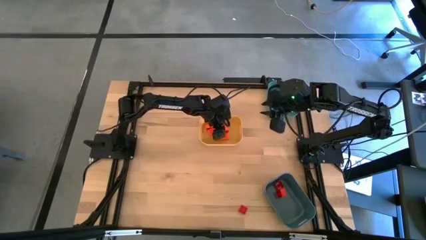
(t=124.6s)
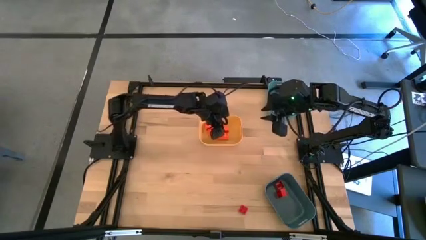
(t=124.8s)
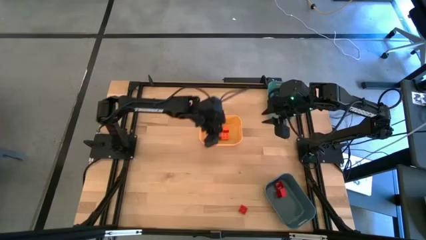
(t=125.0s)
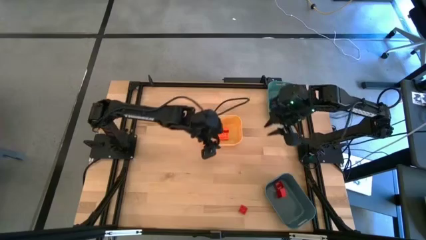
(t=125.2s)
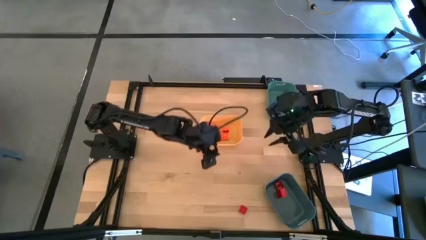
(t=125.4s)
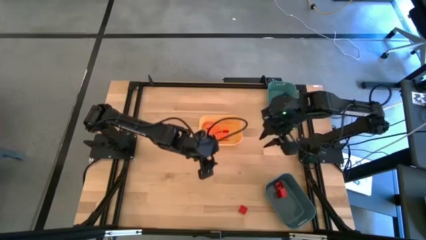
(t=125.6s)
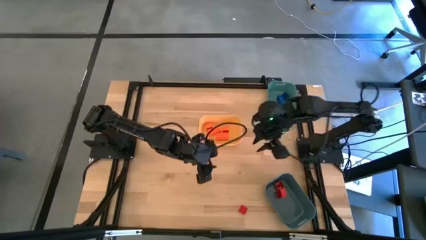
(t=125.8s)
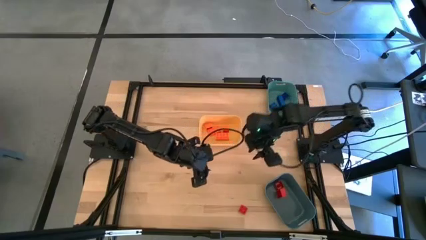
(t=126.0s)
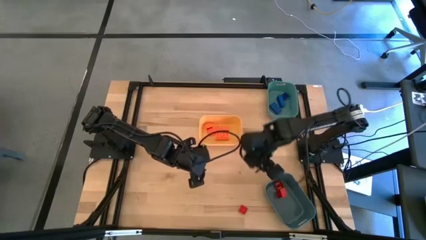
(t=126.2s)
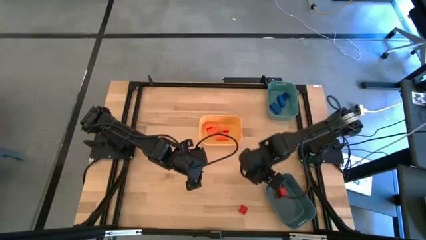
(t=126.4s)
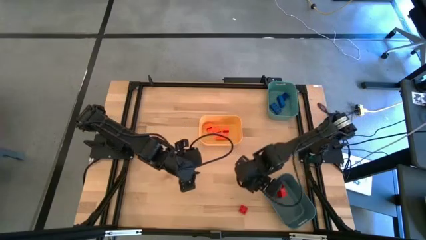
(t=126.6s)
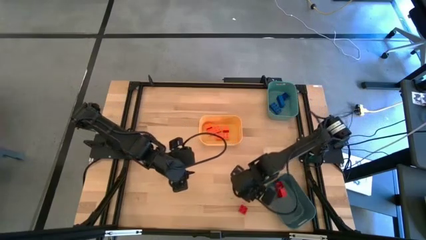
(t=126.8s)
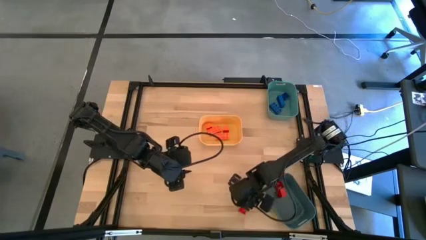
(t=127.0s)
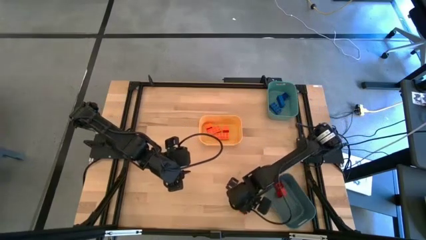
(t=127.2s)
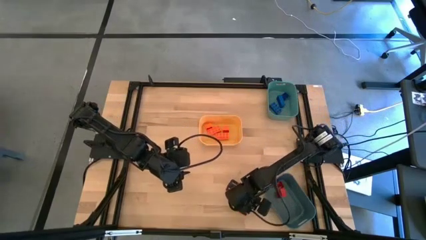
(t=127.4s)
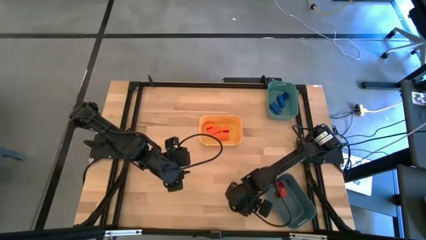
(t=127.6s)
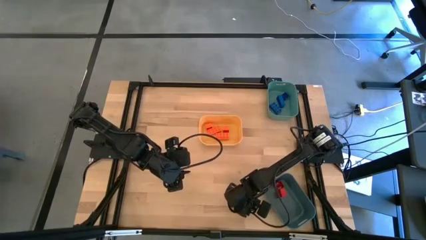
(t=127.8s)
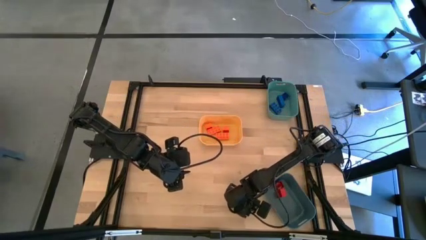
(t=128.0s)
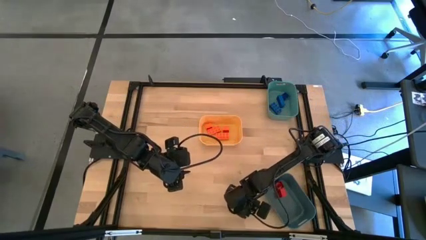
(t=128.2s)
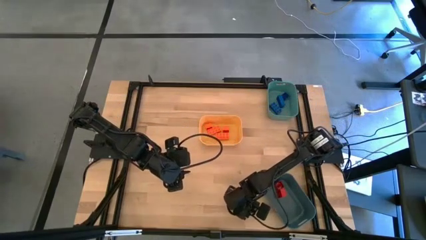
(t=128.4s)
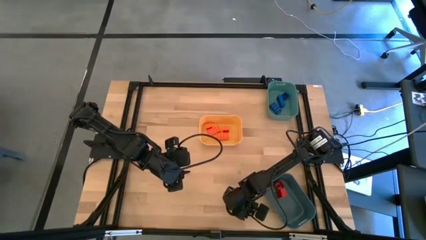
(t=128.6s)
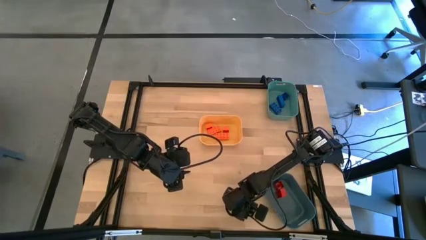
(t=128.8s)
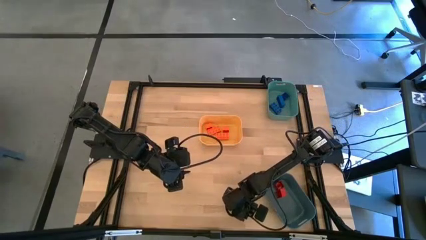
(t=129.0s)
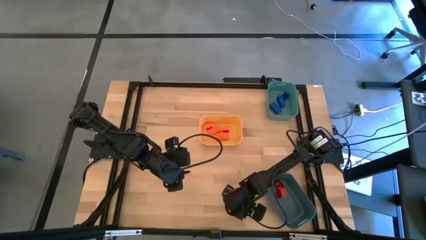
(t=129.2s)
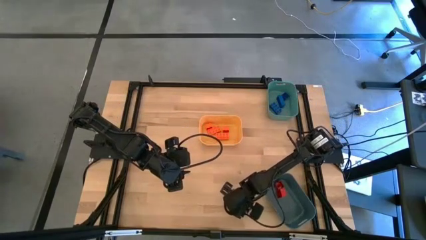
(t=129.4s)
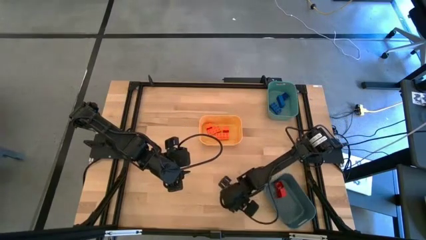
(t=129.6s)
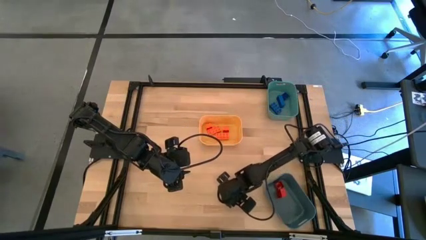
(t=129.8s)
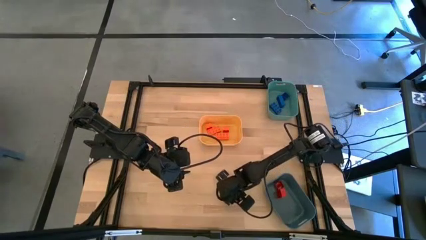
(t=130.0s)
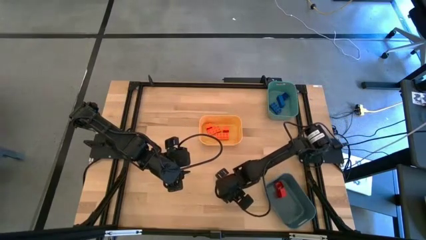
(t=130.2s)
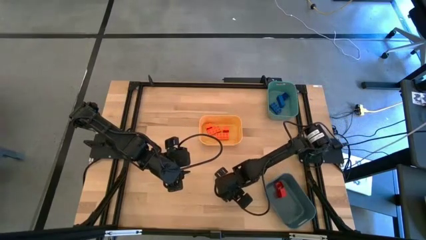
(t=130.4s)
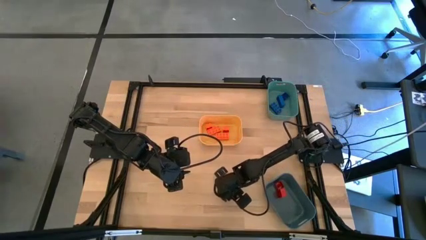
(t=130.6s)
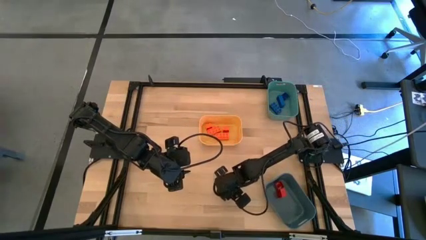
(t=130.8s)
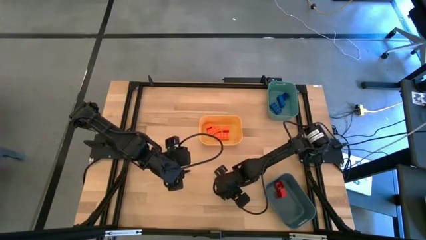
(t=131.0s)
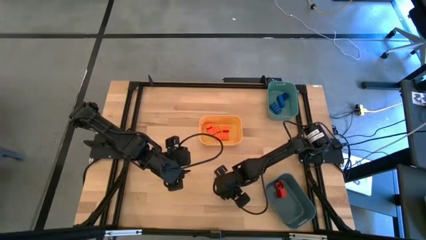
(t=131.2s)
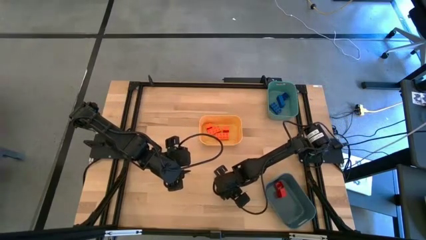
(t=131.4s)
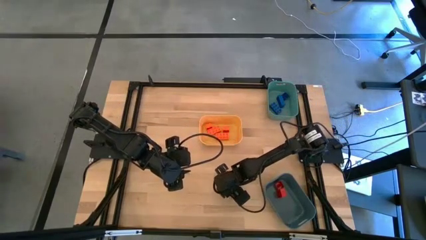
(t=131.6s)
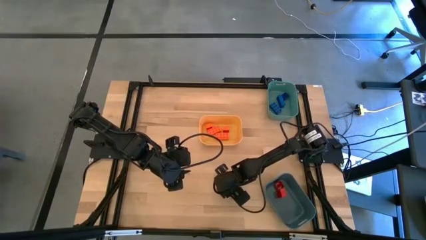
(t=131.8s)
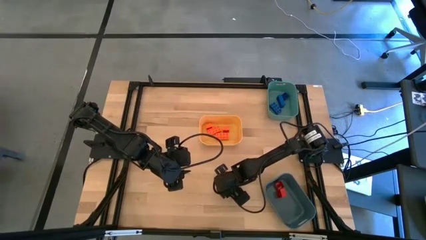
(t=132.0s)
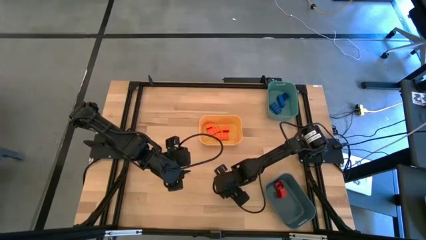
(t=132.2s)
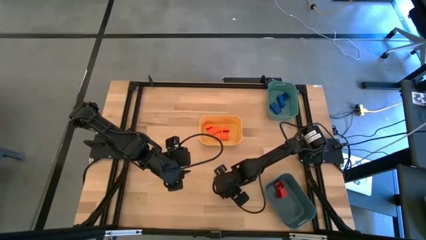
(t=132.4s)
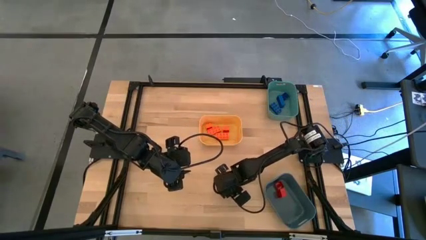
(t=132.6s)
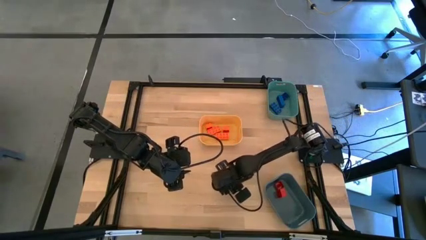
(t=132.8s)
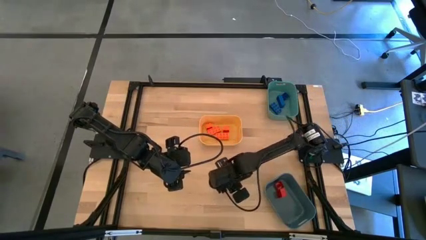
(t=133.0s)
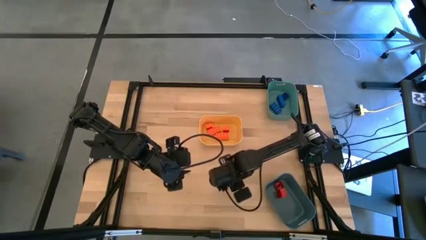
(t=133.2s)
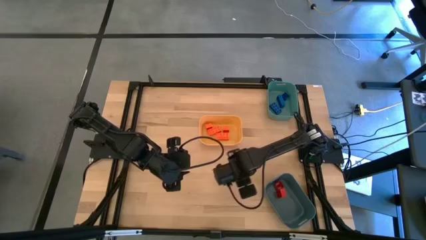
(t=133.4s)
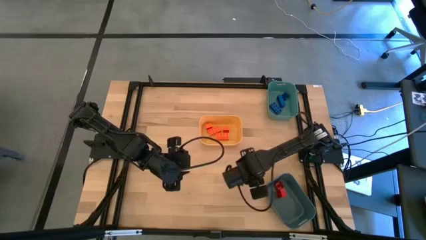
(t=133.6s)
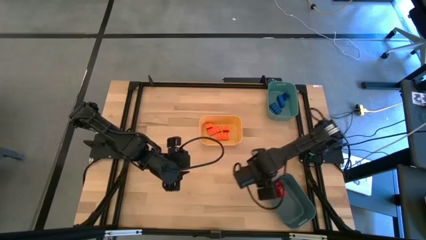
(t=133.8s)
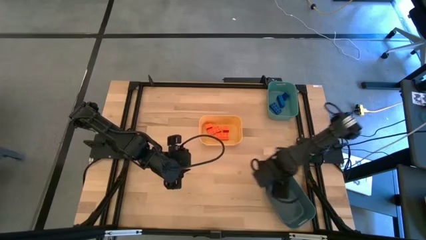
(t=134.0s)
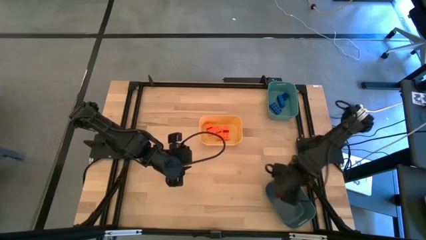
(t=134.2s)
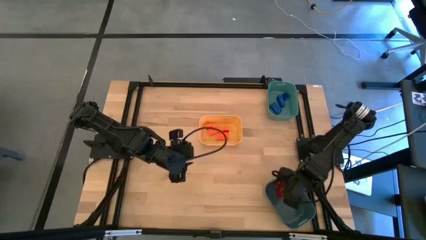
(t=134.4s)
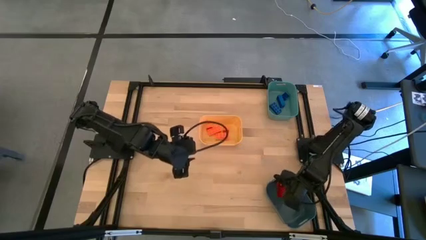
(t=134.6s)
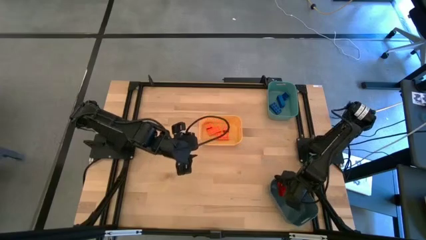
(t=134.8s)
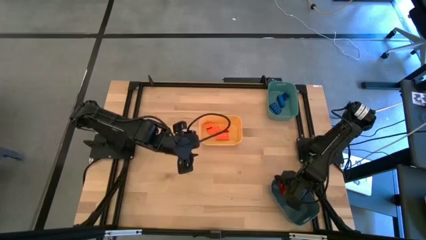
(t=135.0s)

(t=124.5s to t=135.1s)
Task: Sort & place blocks by color
Put the red game piece into the gray bin

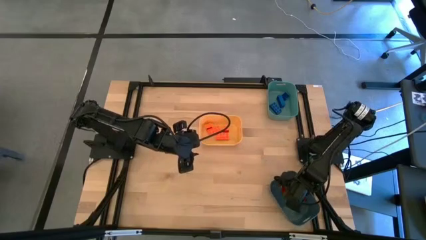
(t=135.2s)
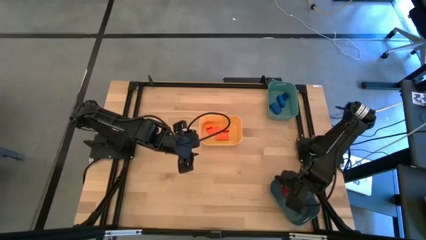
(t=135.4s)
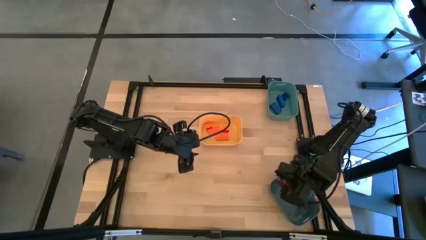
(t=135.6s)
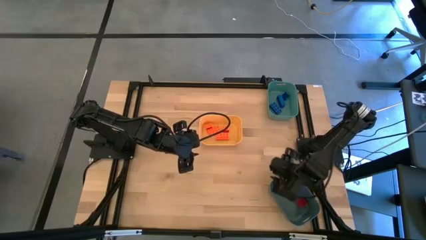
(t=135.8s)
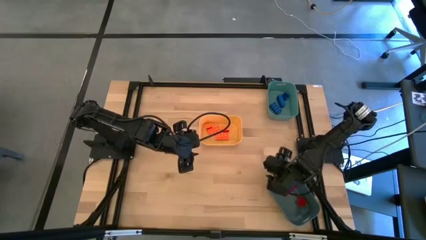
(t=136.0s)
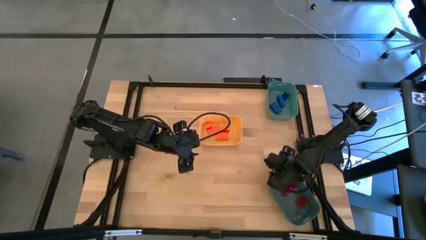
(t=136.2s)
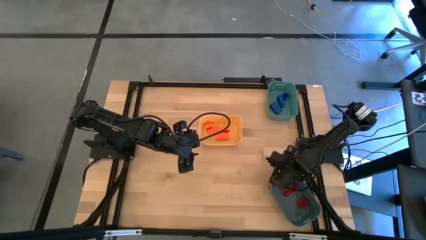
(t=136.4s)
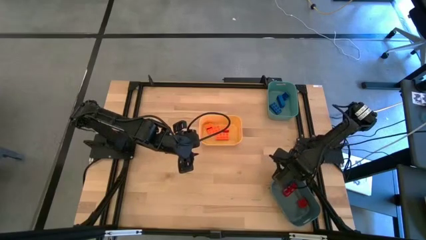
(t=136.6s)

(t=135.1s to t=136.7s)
Adjust the gray bin
